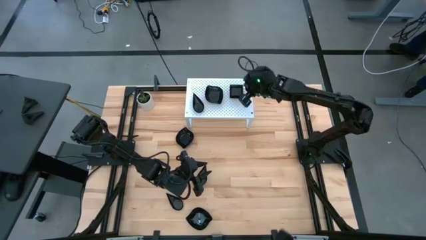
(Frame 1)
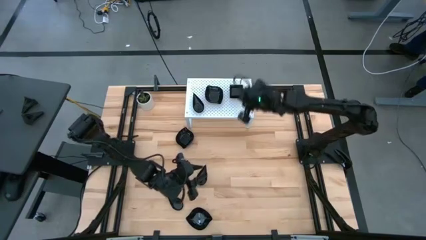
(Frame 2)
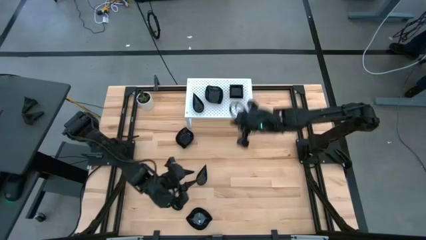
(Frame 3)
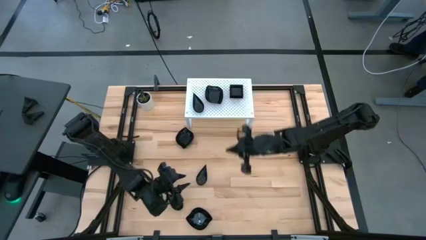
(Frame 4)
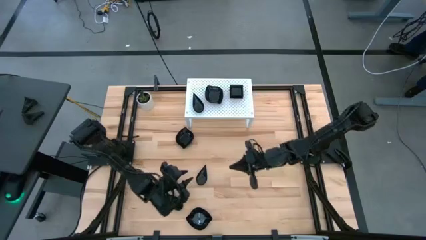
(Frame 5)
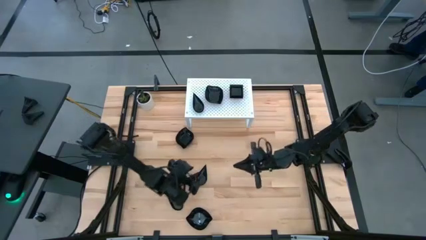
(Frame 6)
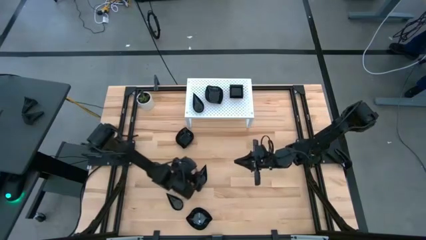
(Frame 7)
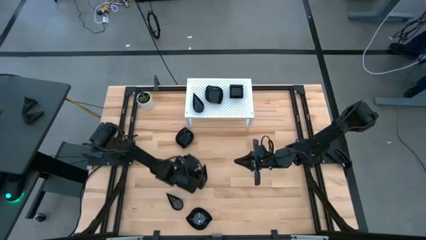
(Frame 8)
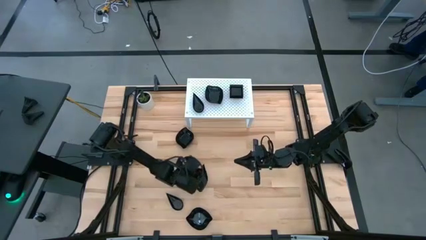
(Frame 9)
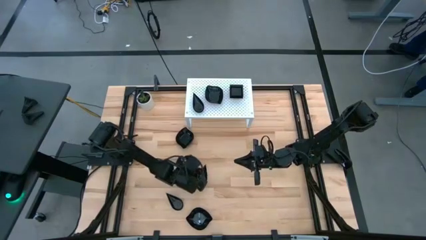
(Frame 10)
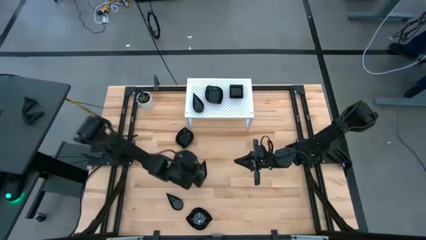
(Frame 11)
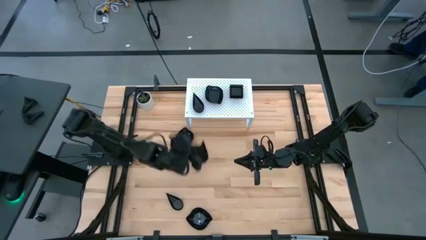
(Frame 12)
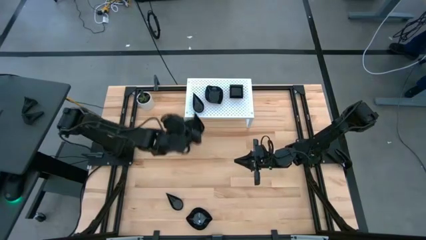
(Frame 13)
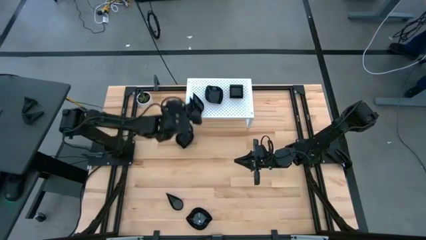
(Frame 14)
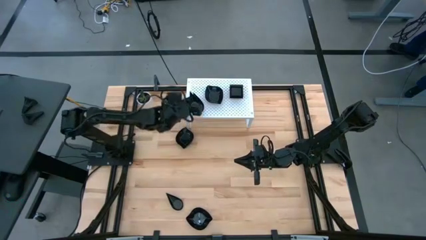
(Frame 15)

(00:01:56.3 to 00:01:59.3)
Task: Pick & Place Mini shaped plates
Stack the black drop-shaped plate on top of the other black drop-shaped plate on the shelf

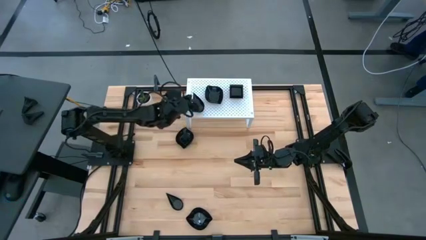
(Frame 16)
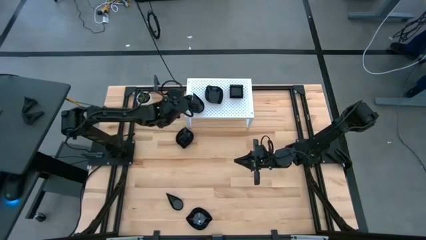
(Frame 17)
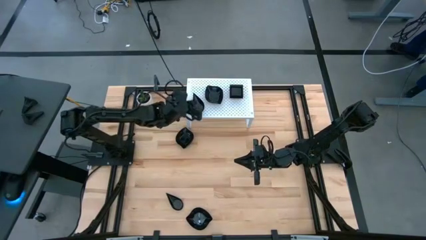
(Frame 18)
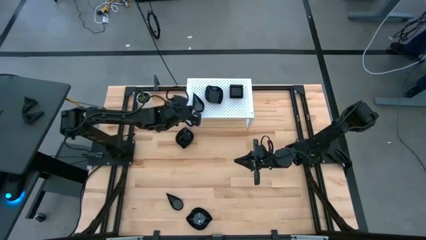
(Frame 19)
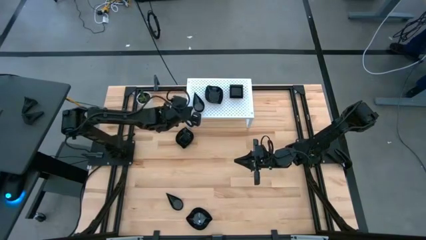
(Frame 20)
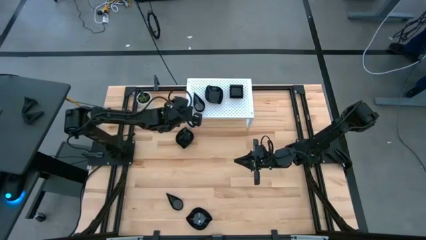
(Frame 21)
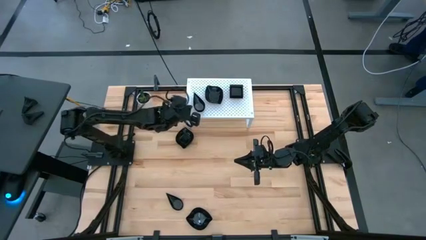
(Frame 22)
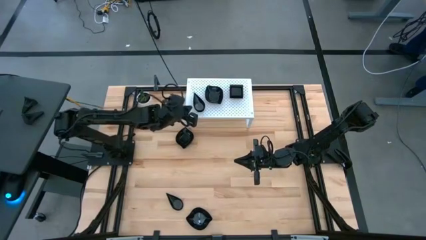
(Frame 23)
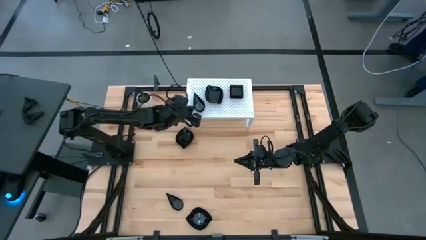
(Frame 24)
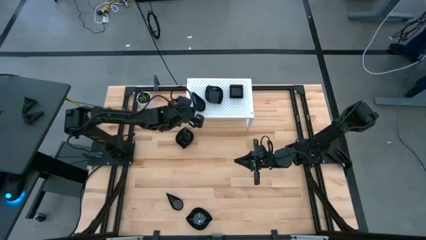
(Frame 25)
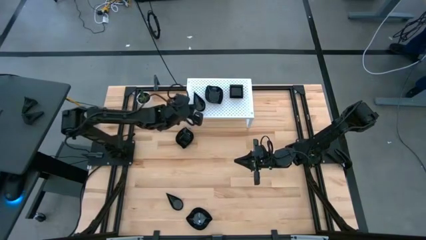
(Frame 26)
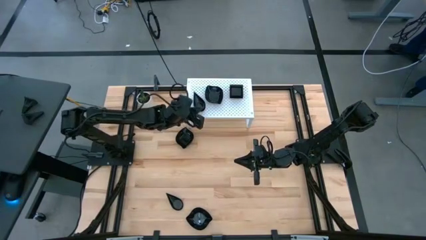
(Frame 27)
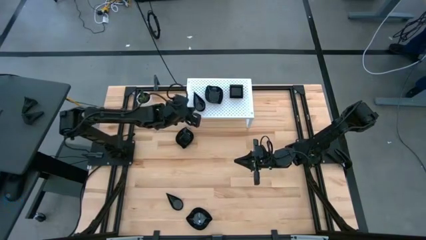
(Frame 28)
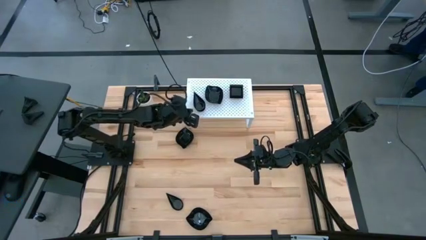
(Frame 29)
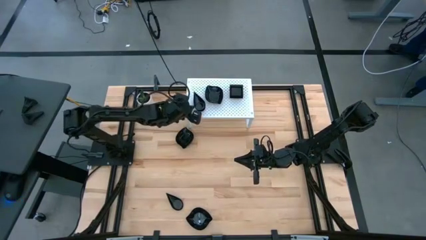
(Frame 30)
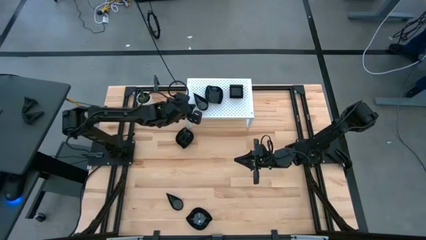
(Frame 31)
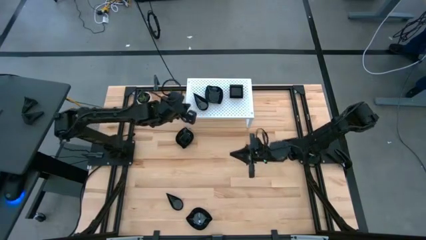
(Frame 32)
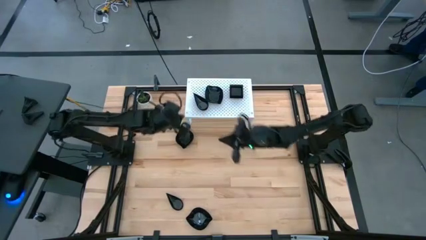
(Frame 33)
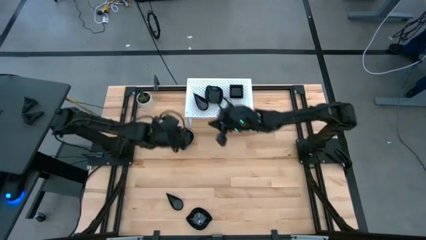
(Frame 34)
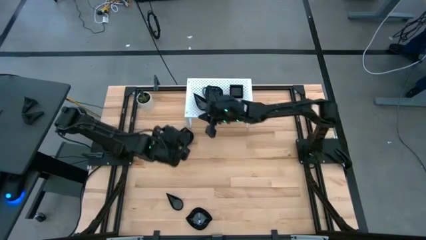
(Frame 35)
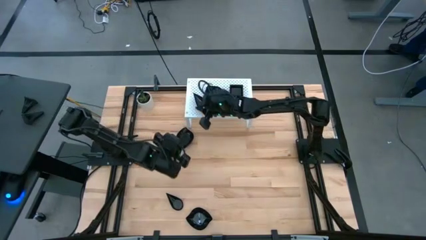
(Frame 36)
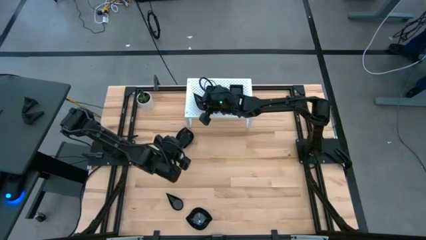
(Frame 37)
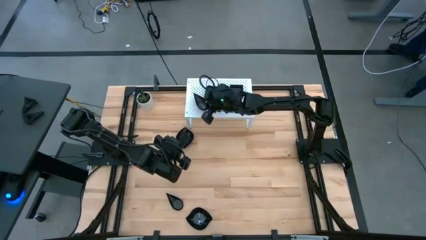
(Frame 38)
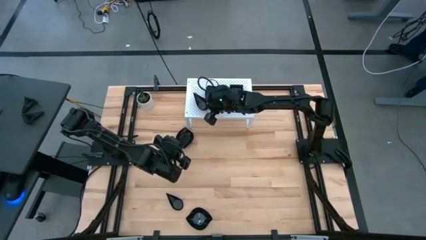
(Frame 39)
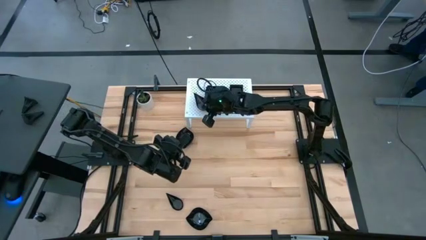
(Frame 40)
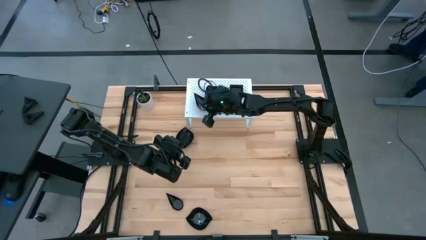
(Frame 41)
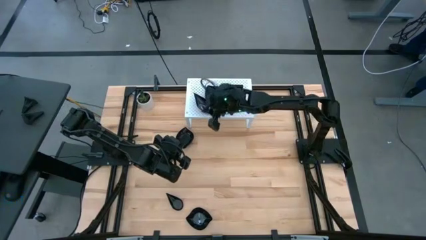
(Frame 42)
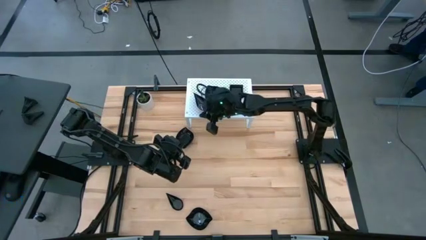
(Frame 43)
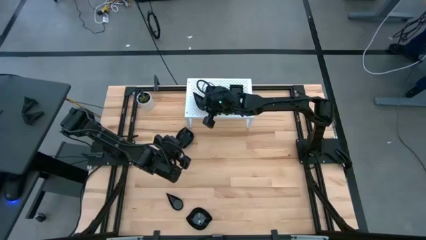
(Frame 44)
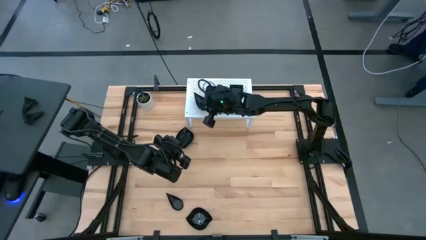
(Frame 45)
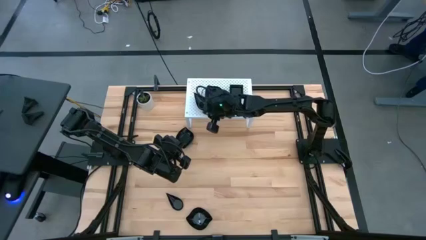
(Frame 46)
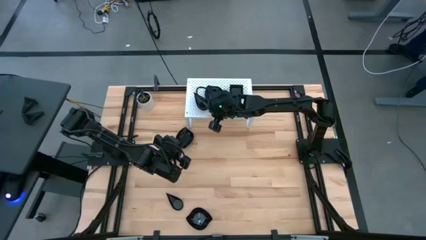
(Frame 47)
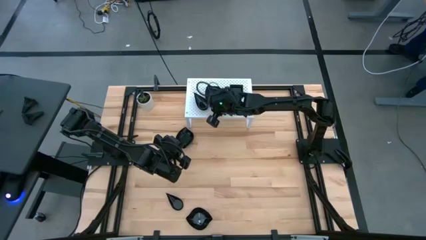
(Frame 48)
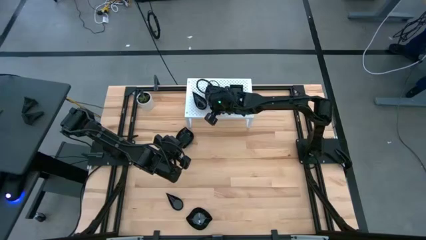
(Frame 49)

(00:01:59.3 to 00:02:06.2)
Adjust the stack of black drop-shaped plates on the shelf

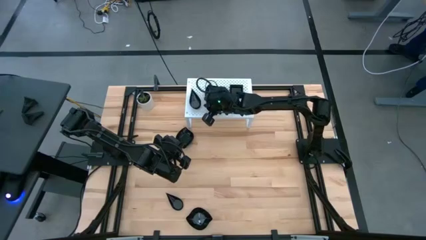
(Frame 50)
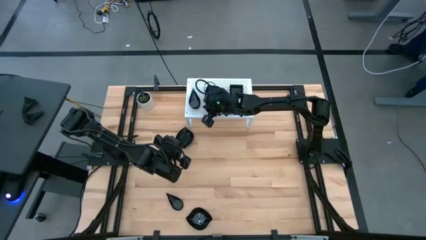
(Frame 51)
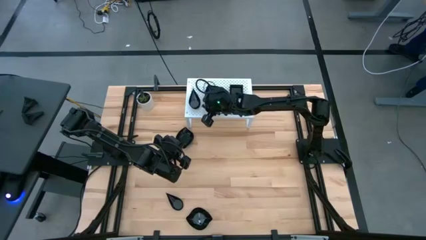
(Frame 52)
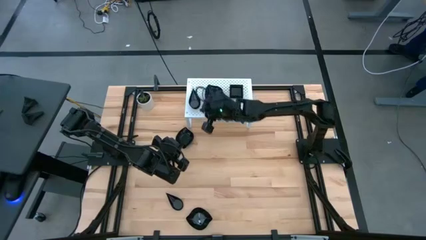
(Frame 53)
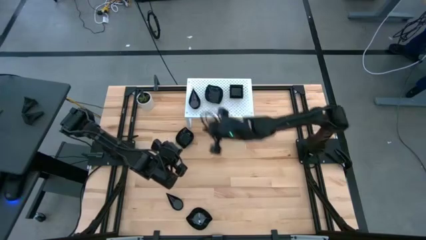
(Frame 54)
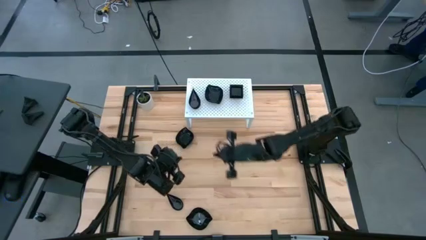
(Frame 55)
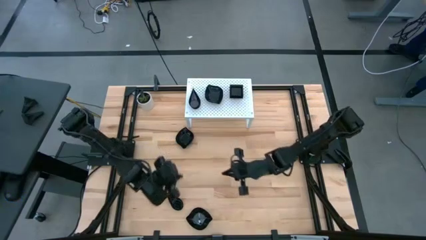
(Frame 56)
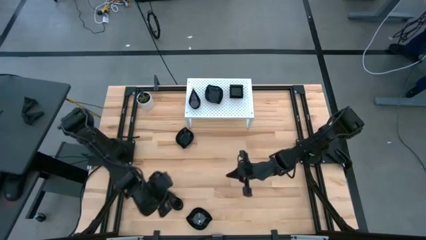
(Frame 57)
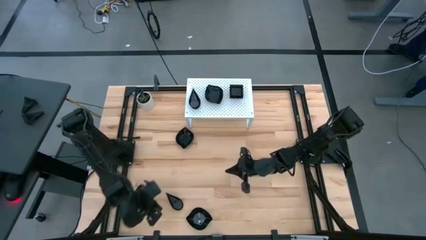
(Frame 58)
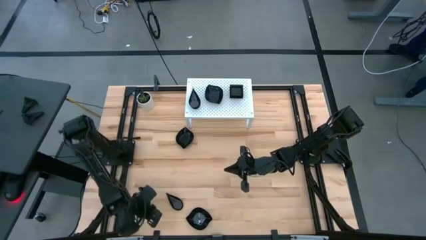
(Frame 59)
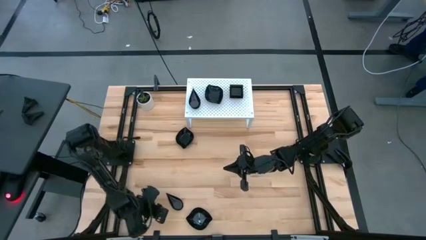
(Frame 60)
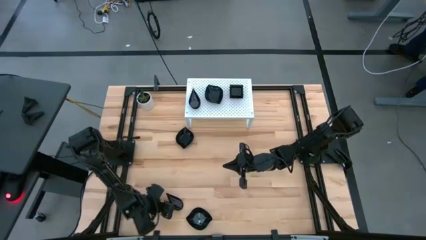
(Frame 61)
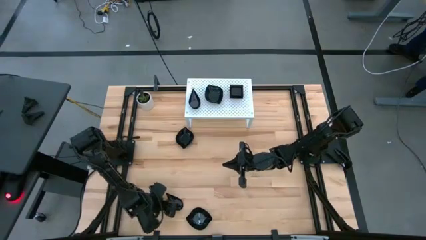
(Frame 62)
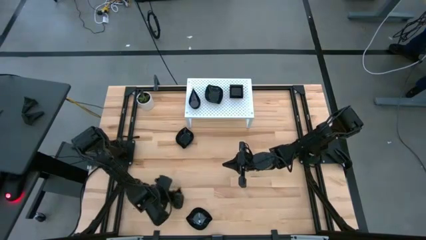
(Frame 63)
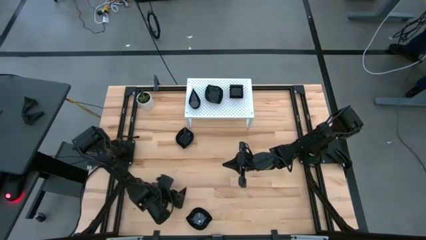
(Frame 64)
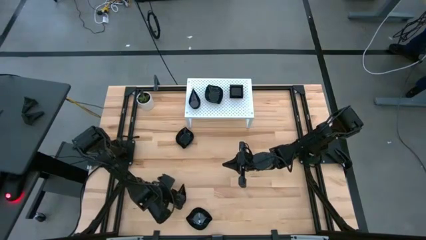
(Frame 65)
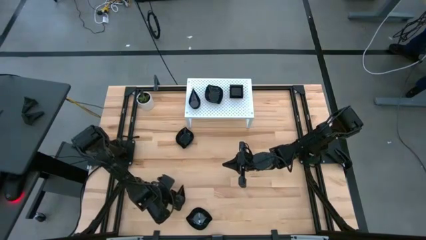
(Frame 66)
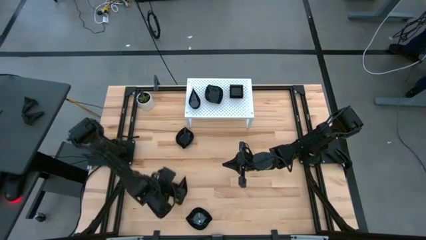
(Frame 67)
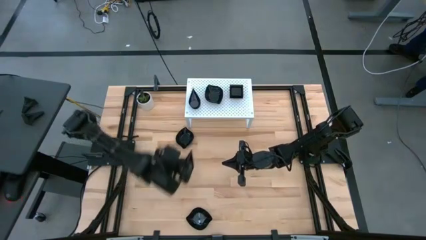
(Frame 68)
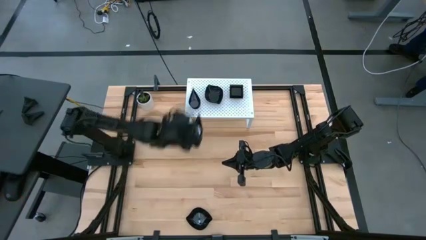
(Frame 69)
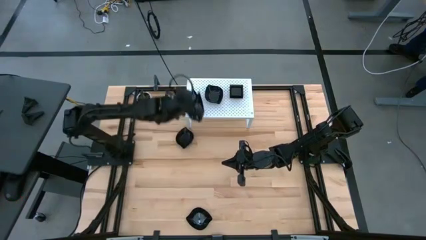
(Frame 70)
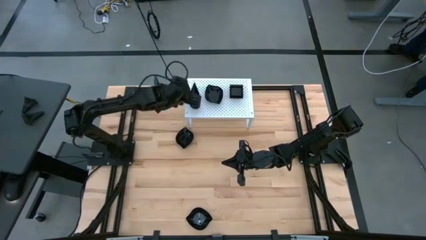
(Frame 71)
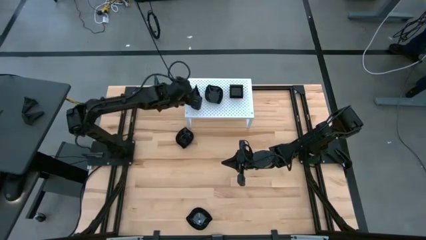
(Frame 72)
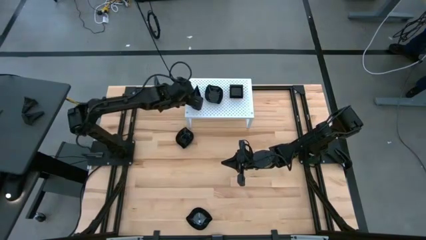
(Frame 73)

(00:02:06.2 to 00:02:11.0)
Stack the black drop-shaped plate on top of the other black drop-shaped plate on the shelf

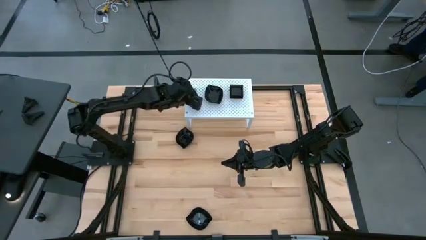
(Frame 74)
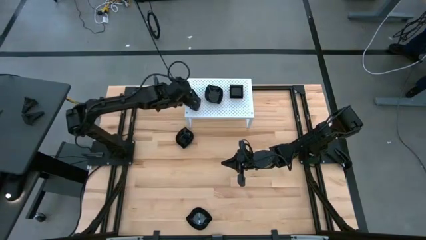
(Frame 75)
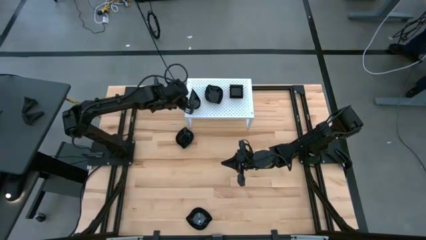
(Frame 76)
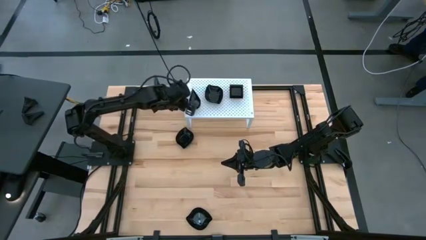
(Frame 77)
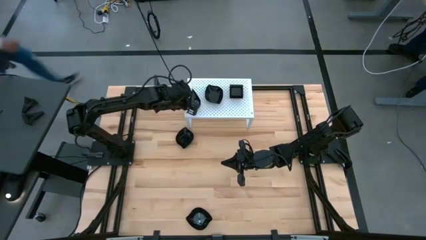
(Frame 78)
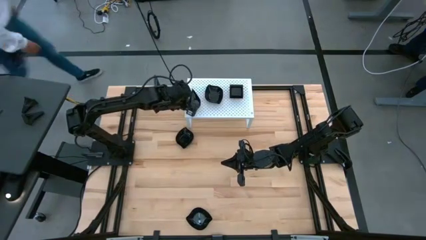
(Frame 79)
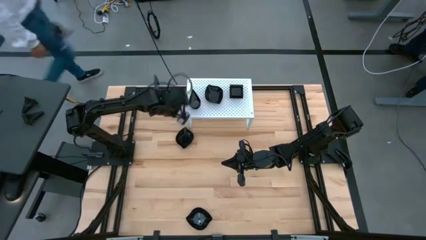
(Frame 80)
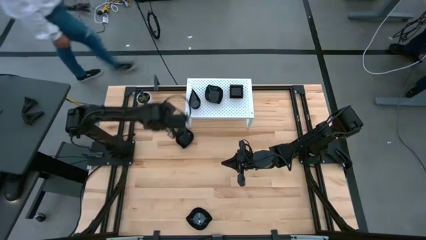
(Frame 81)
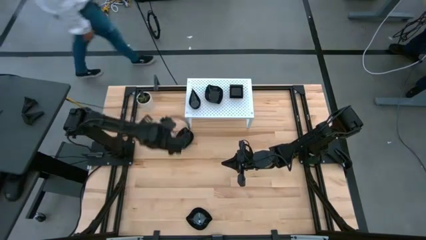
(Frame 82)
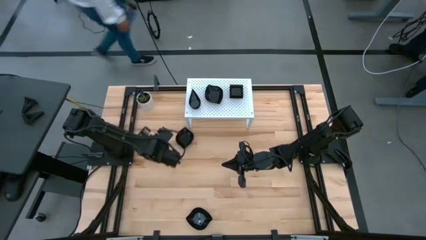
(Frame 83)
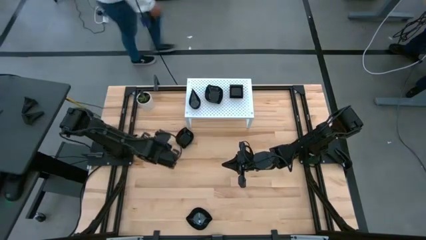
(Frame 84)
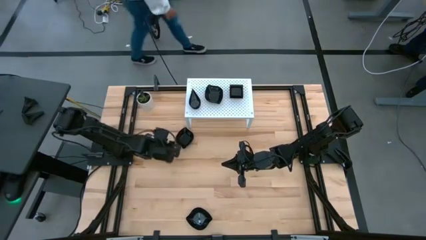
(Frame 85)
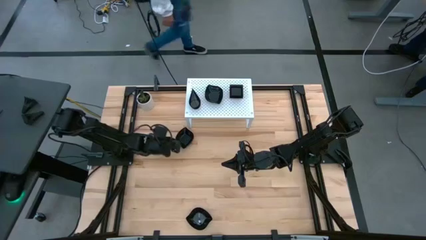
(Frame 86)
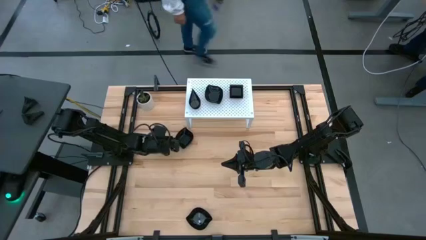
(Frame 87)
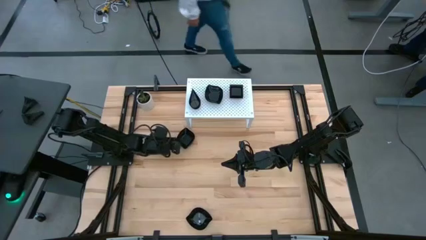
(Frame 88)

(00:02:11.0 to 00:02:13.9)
Stack the black leaf-shaped plate on top of the other black leaf-shaped plate on the shelf
